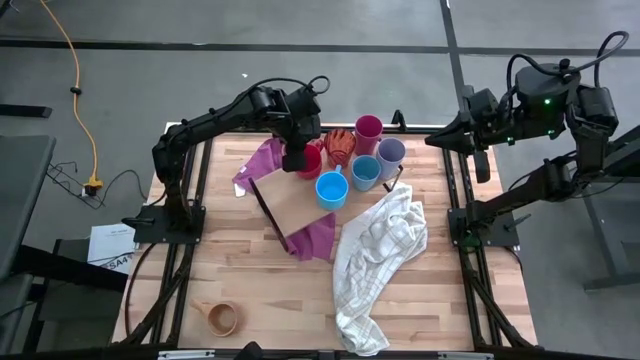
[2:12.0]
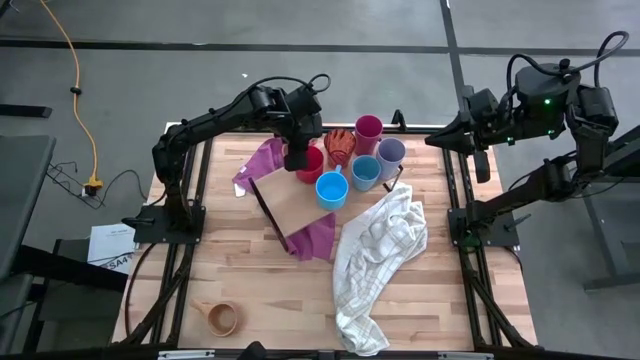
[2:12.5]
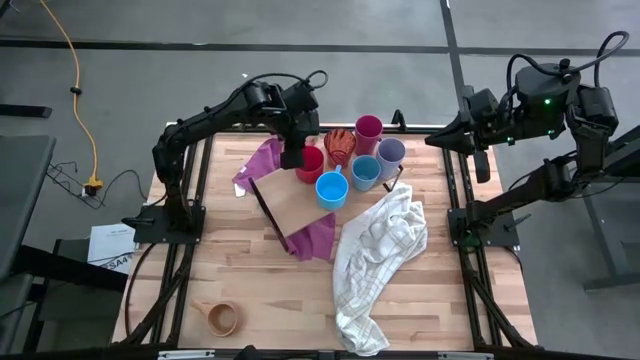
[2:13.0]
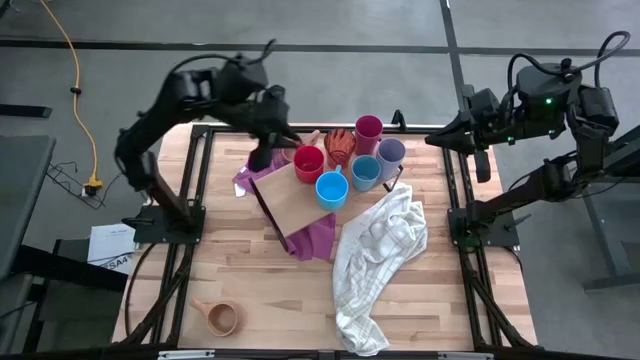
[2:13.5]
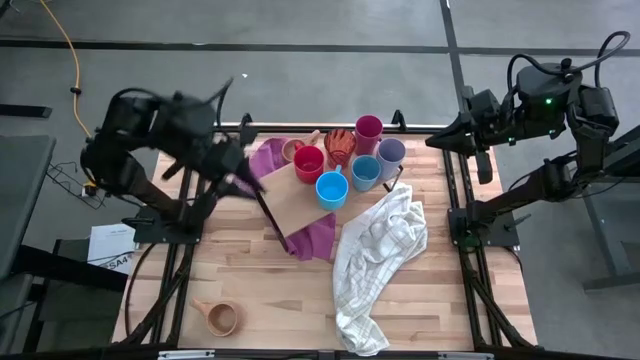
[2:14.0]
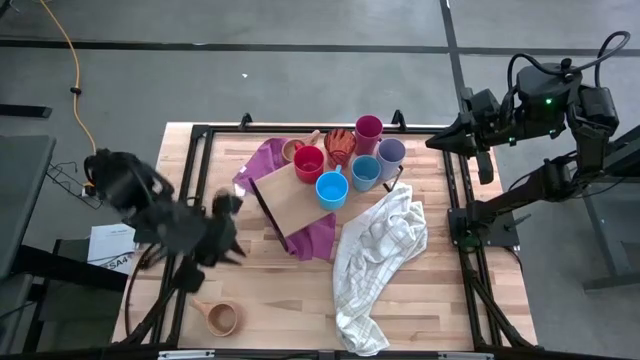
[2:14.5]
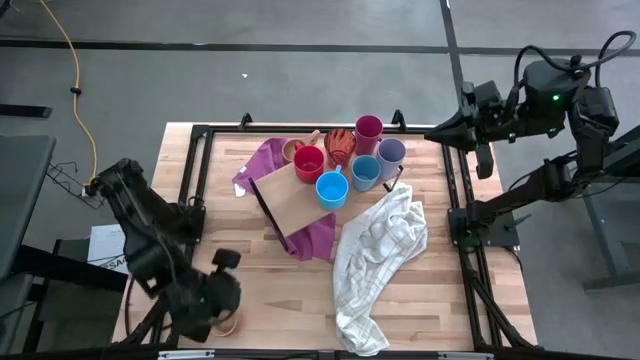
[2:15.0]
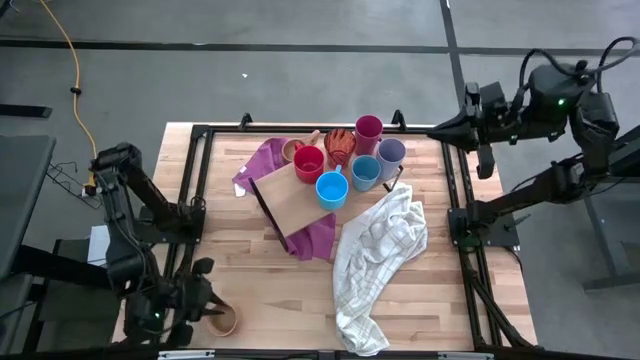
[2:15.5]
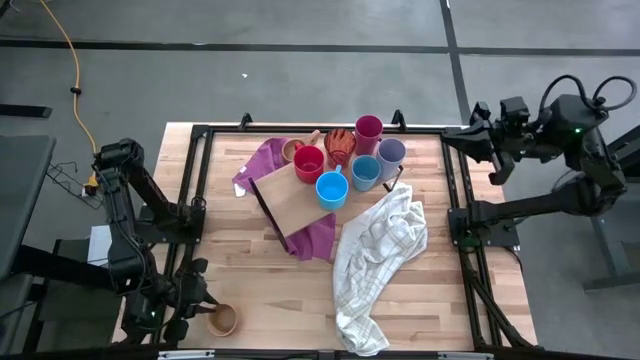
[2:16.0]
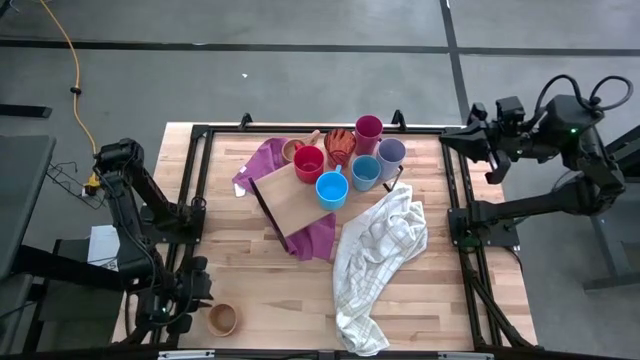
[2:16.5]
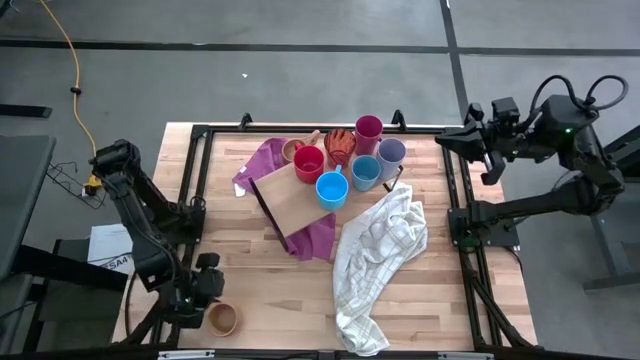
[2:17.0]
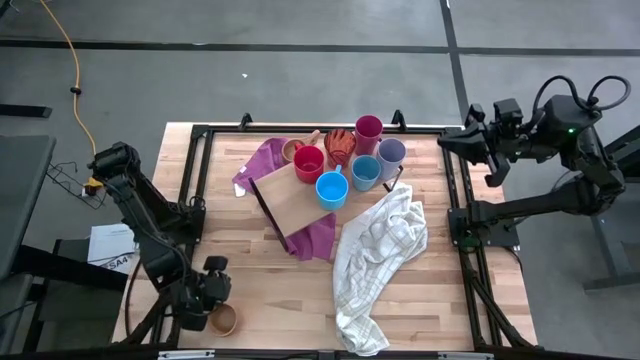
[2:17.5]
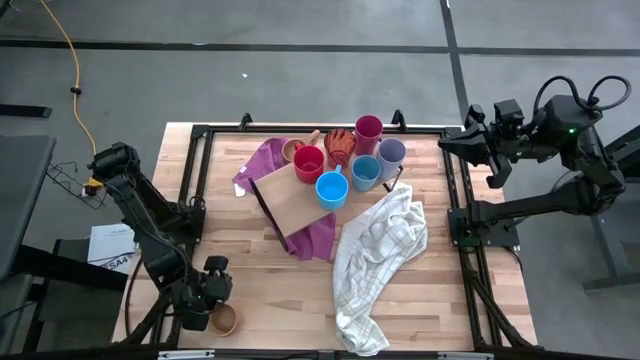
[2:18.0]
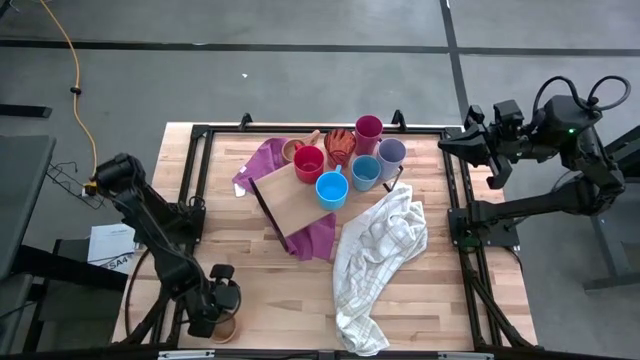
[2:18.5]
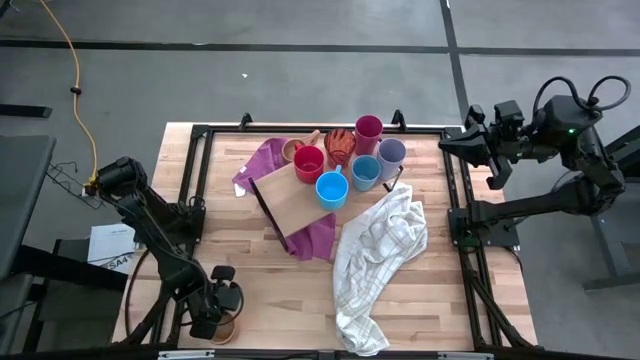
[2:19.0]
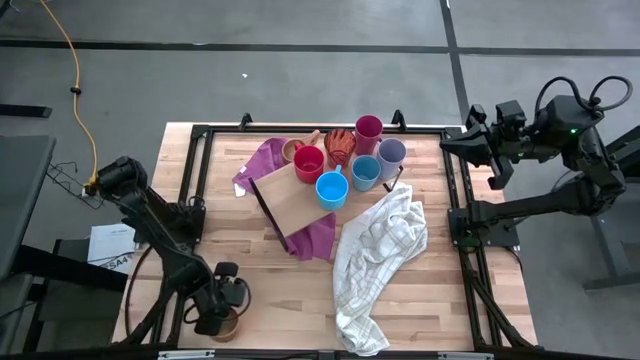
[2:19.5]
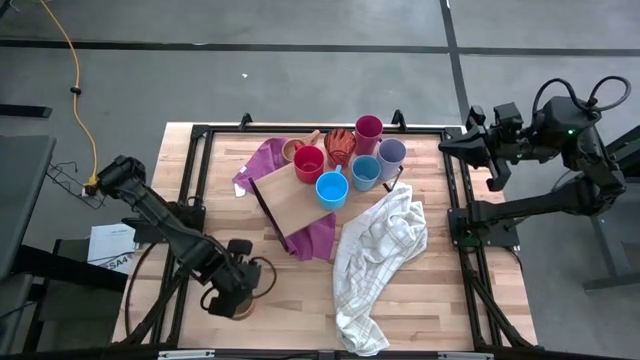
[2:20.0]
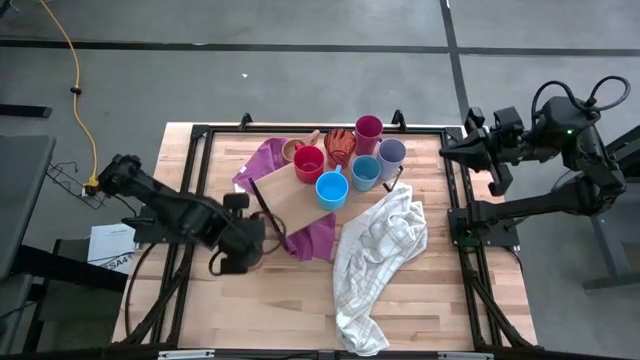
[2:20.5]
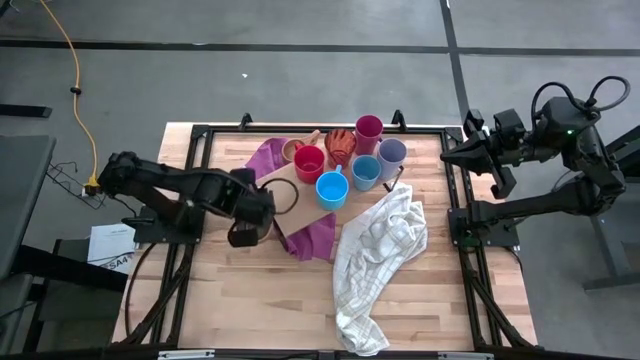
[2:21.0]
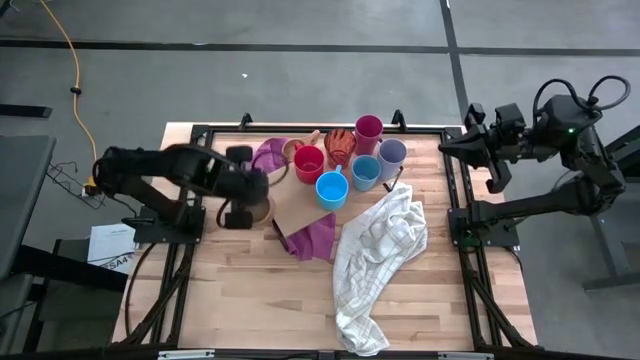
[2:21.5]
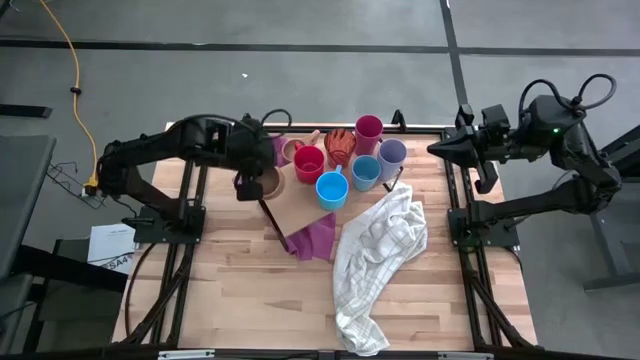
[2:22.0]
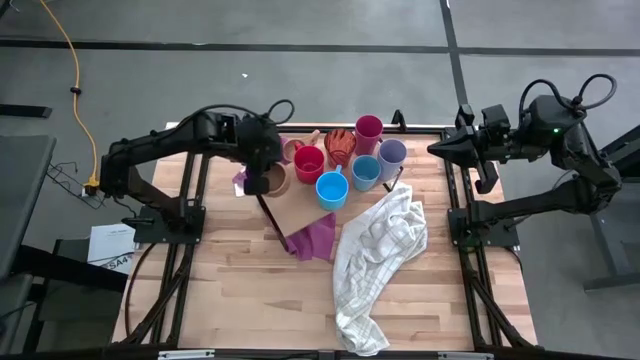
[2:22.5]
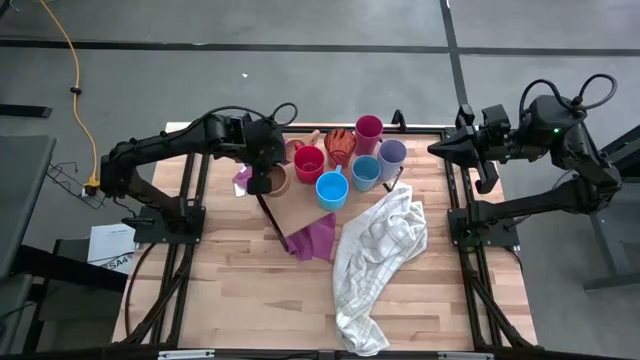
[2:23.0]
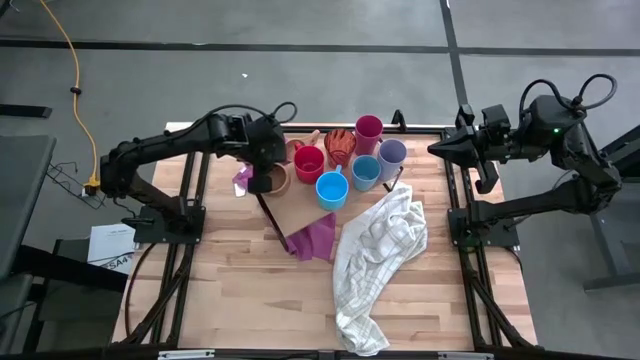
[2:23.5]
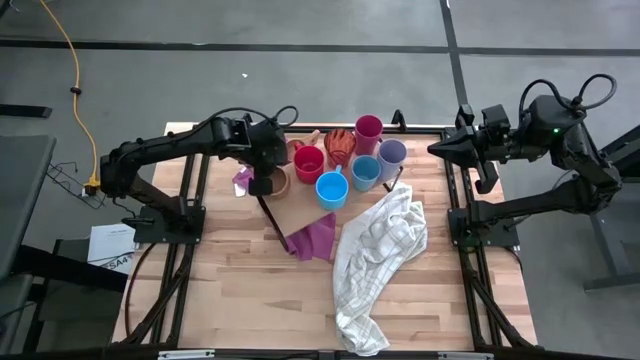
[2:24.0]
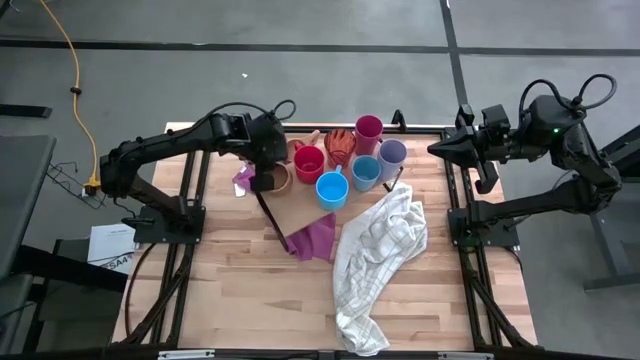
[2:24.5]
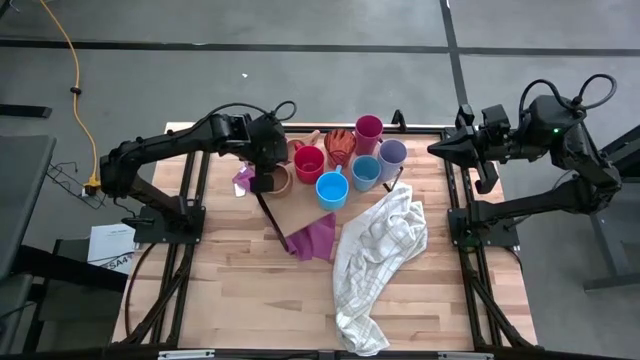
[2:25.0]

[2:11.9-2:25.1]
Task: Stack small to large cups/mugs on shelf
Put the bottom brown mug on the shelf

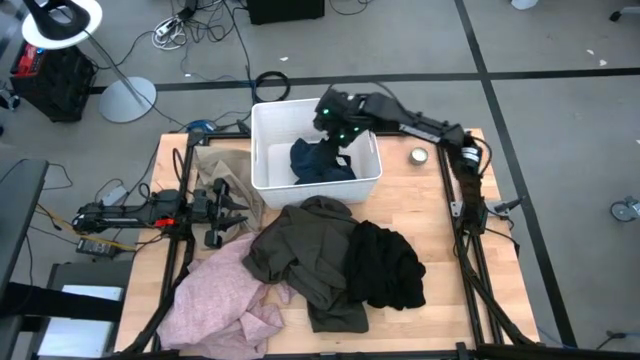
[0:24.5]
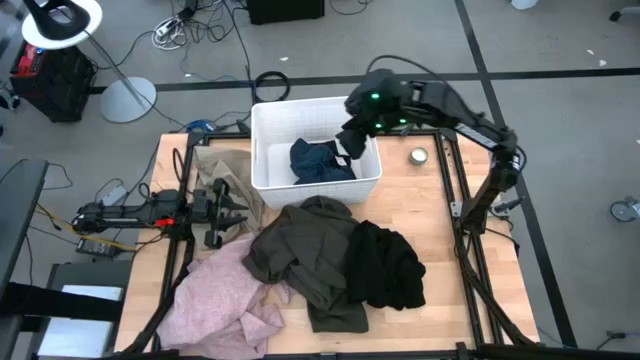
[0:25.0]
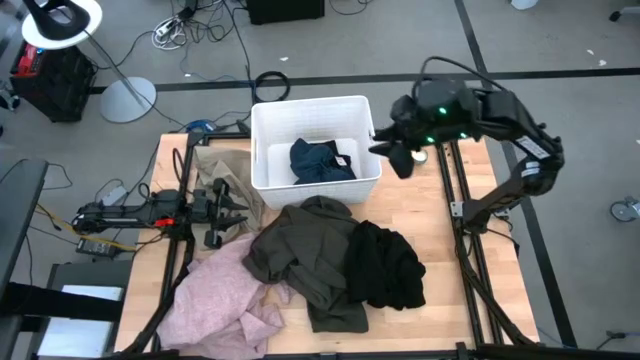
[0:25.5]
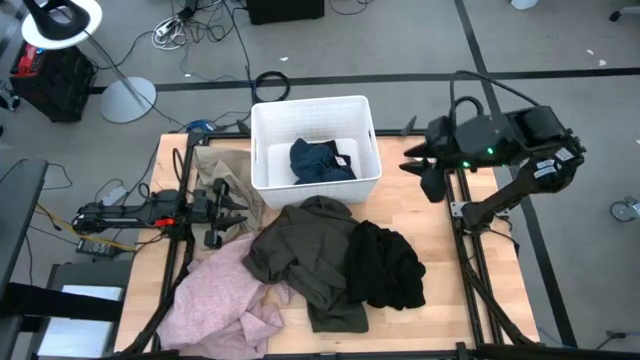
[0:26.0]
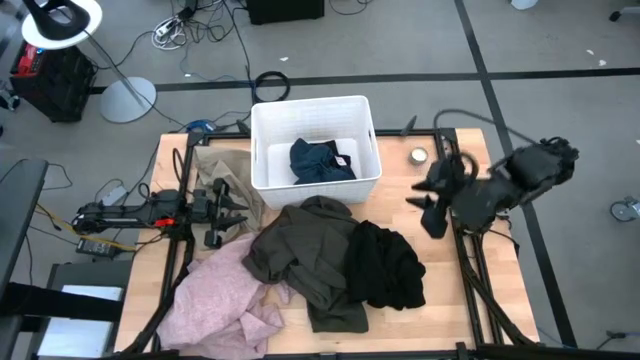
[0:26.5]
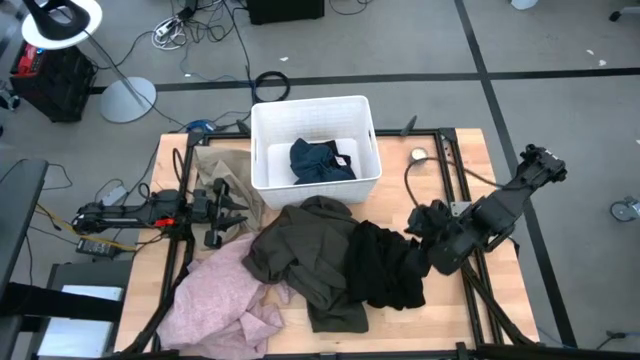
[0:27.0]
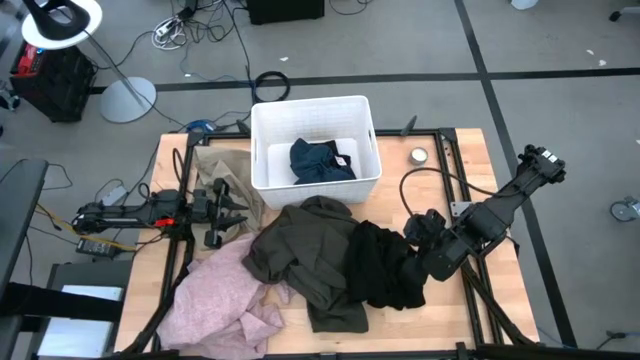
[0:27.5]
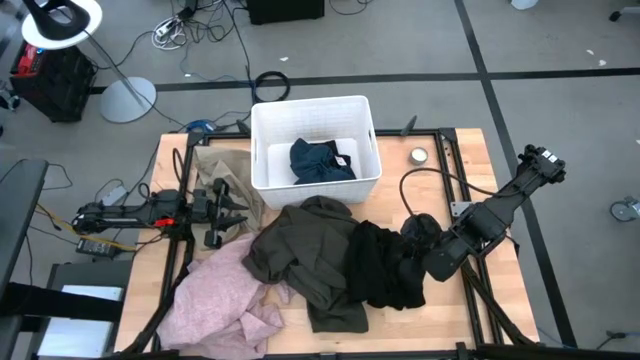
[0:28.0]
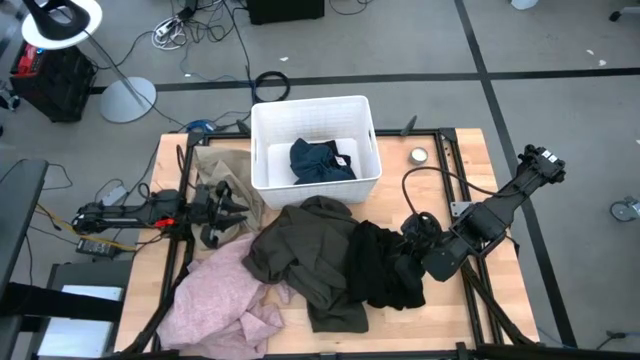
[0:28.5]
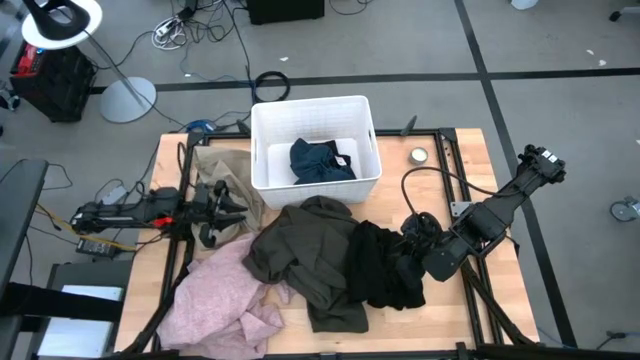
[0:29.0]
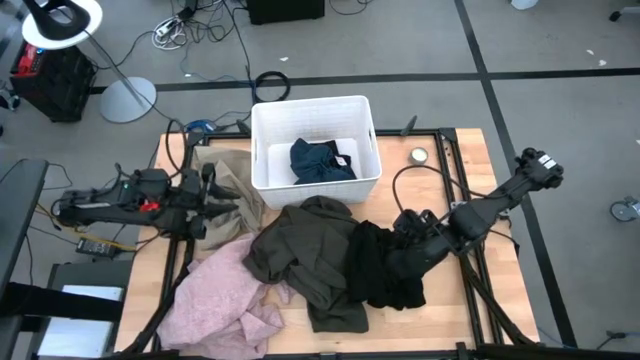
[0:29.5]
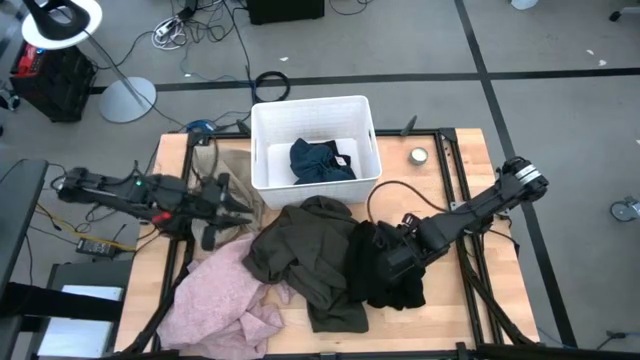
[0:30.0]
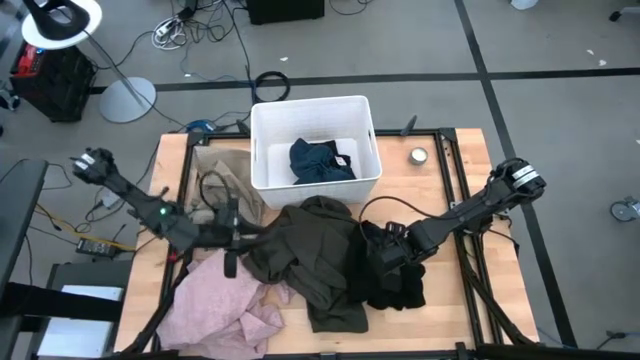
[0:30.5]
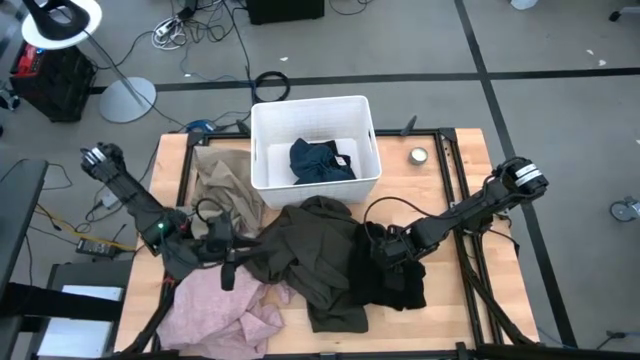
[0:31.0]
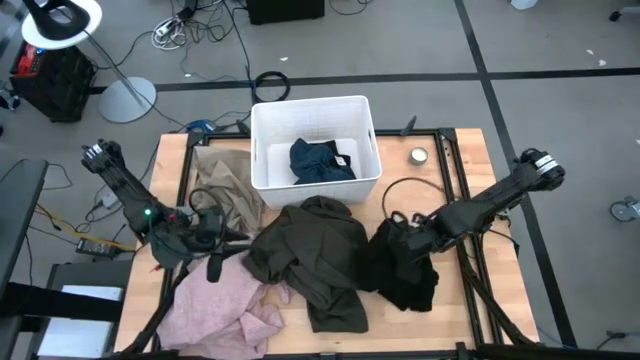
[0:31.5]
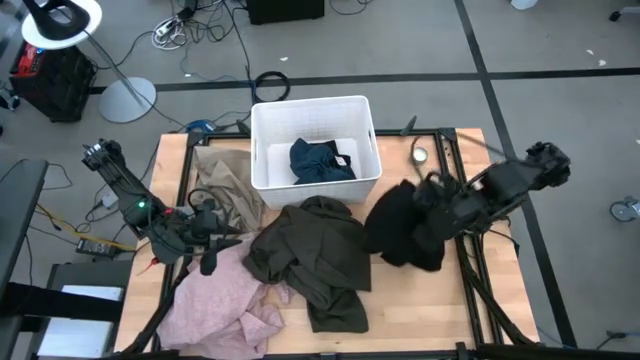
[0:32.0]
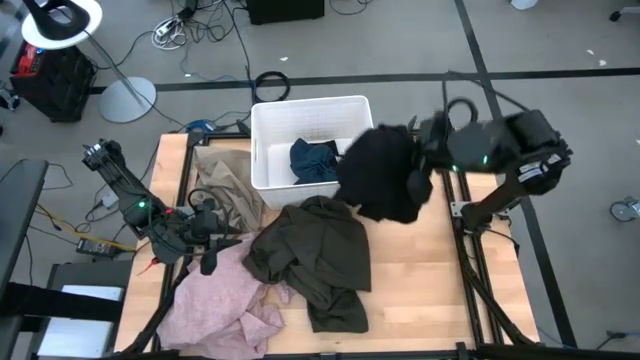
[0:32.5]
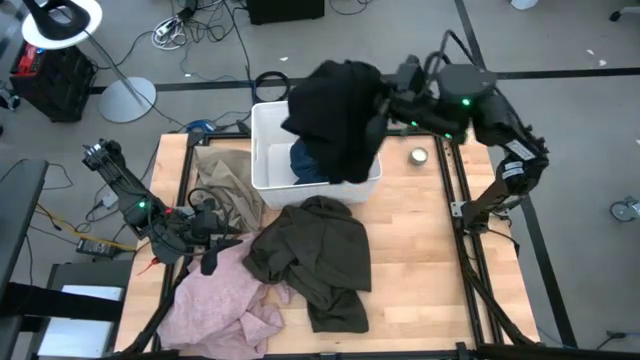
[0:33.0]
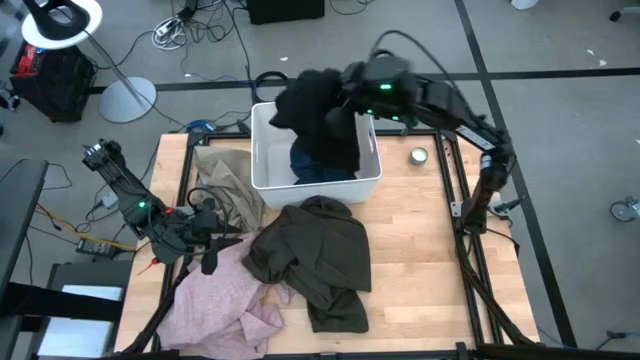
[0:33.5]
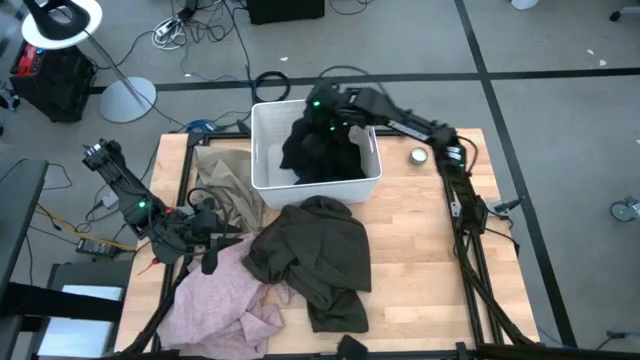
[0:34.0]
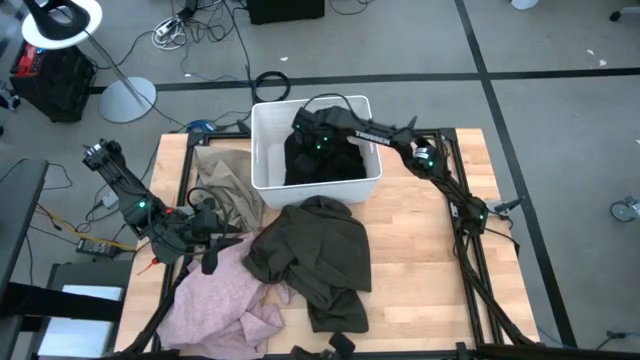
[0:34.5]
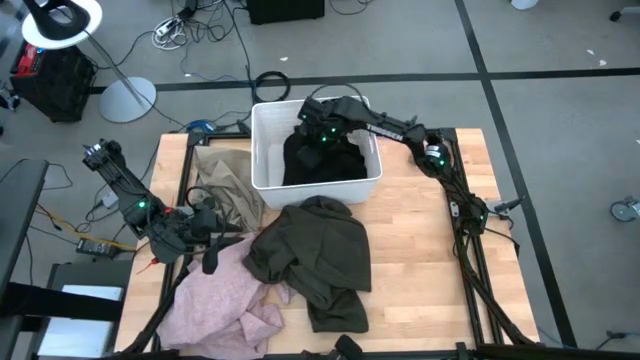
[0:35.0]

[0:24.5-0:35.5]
Task: Sort clothes
Put the black shirt into the white laundry bin
